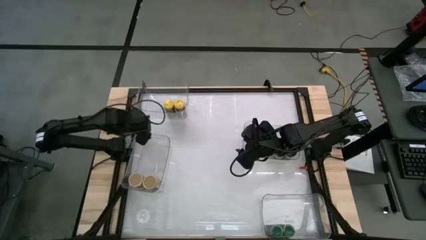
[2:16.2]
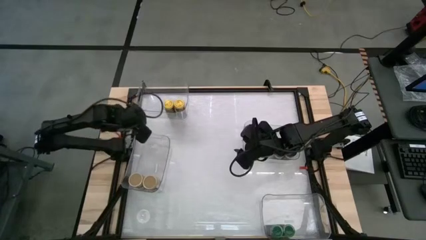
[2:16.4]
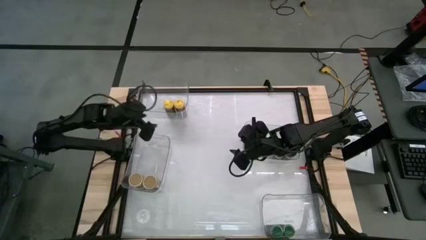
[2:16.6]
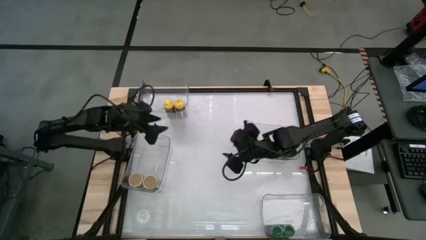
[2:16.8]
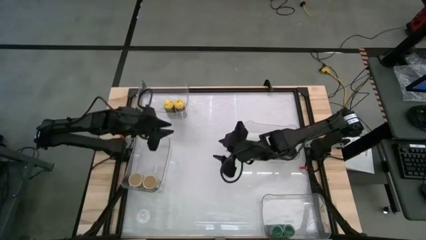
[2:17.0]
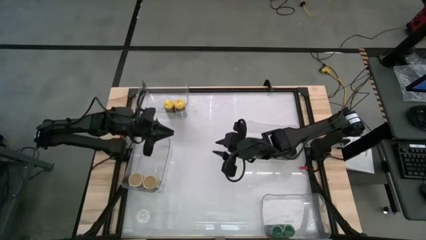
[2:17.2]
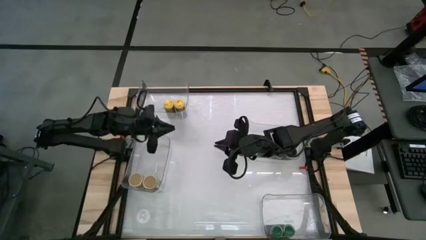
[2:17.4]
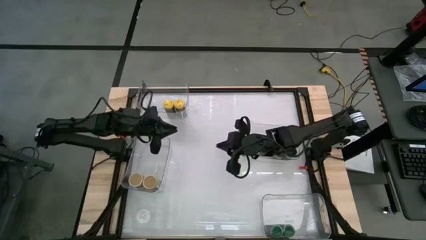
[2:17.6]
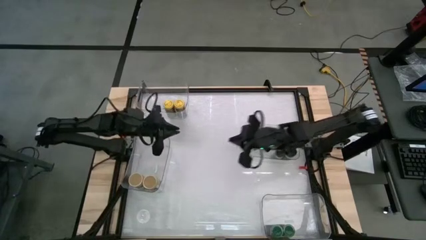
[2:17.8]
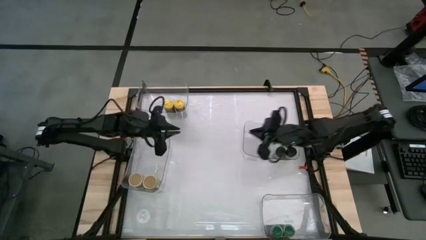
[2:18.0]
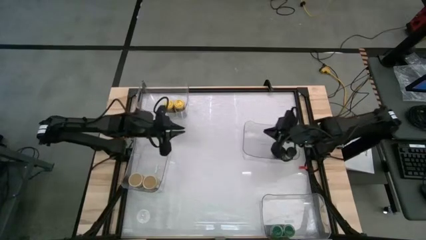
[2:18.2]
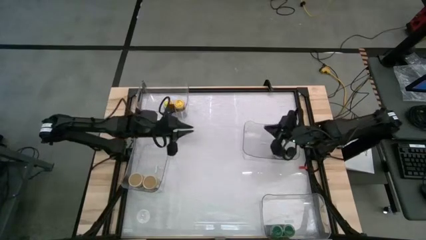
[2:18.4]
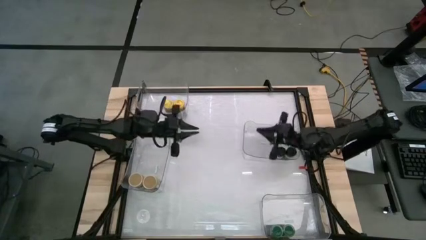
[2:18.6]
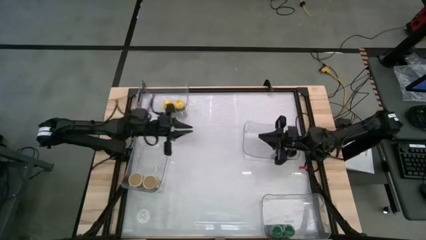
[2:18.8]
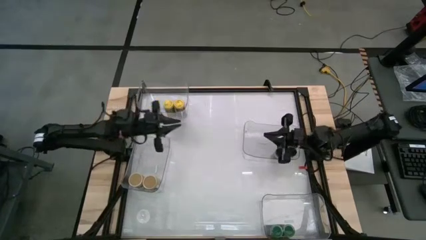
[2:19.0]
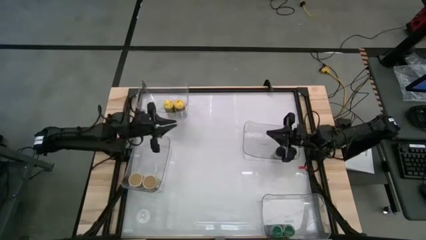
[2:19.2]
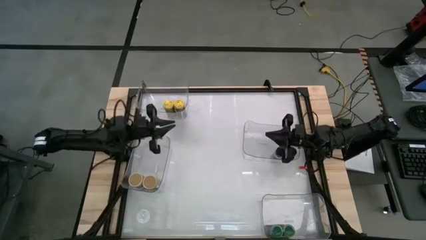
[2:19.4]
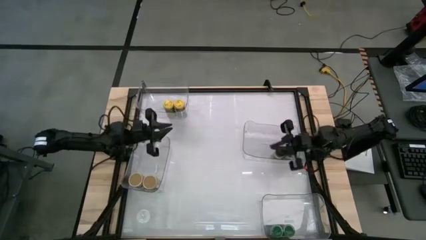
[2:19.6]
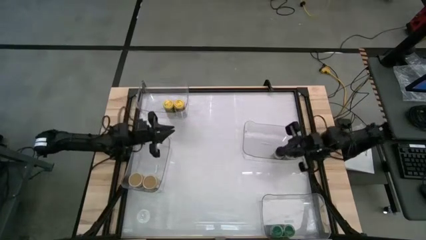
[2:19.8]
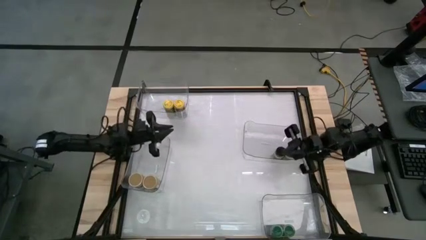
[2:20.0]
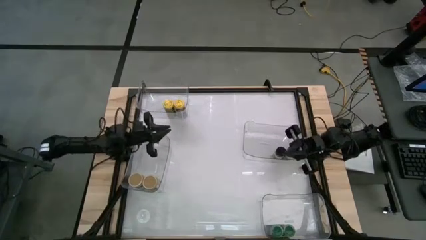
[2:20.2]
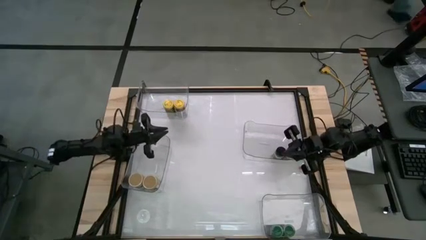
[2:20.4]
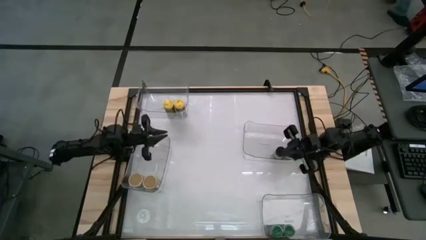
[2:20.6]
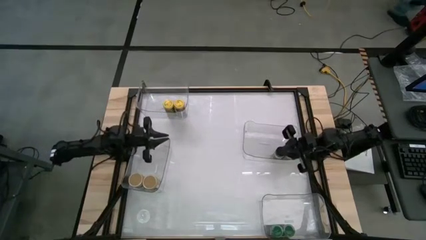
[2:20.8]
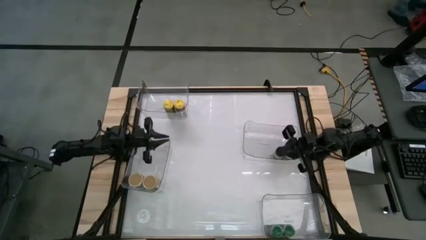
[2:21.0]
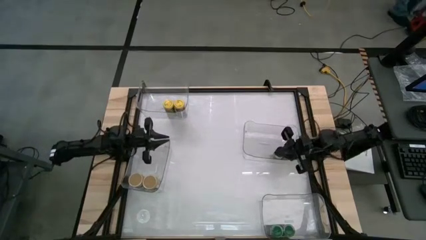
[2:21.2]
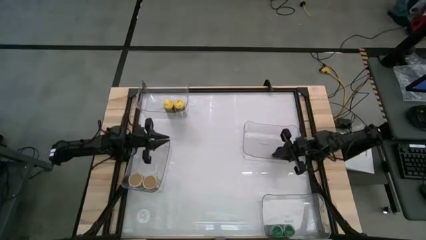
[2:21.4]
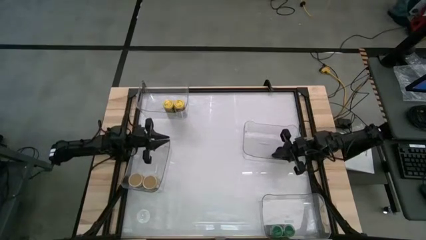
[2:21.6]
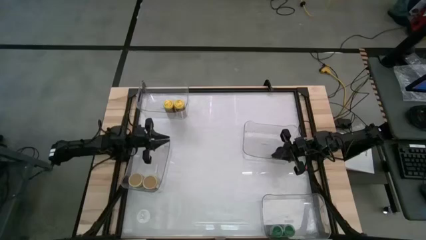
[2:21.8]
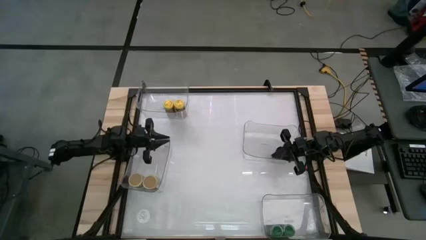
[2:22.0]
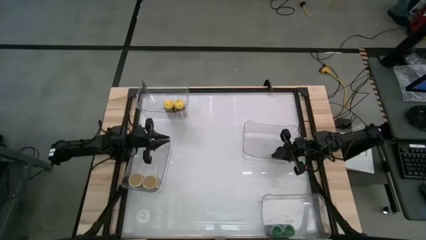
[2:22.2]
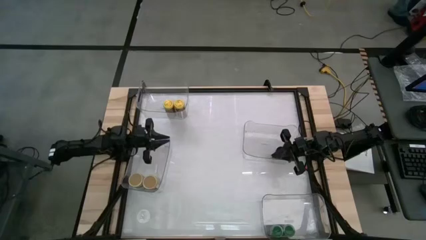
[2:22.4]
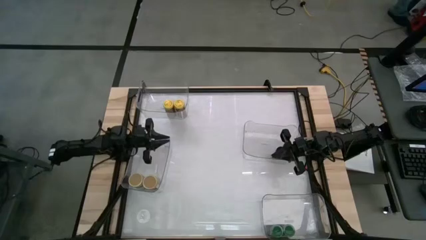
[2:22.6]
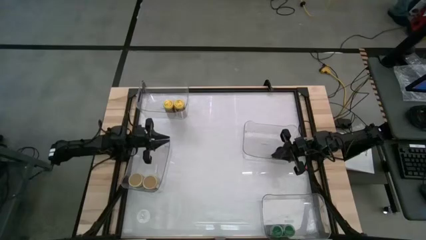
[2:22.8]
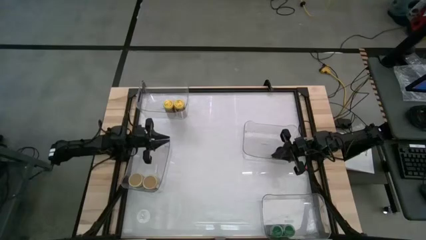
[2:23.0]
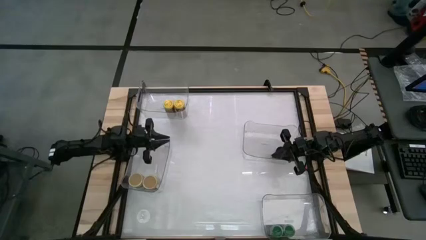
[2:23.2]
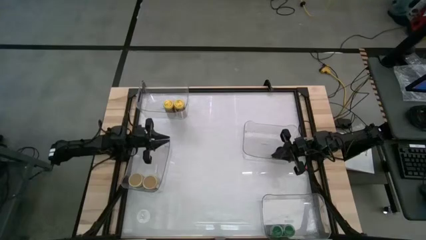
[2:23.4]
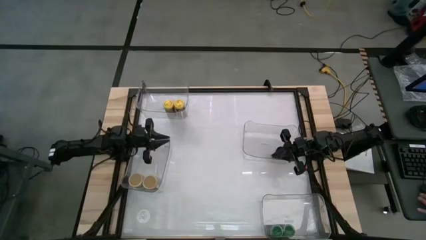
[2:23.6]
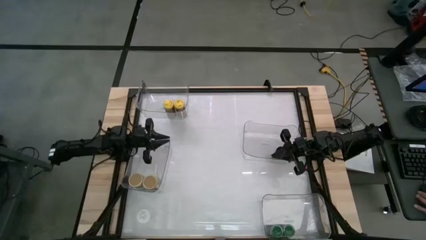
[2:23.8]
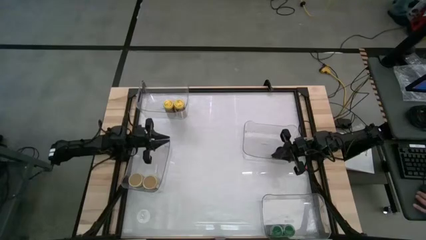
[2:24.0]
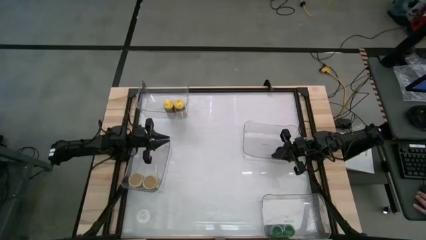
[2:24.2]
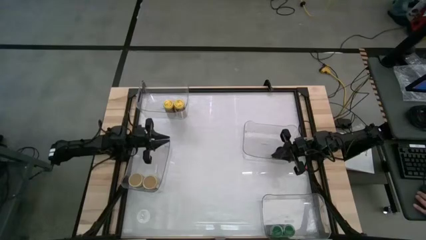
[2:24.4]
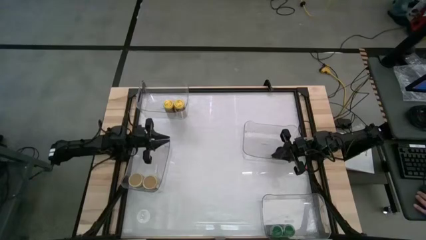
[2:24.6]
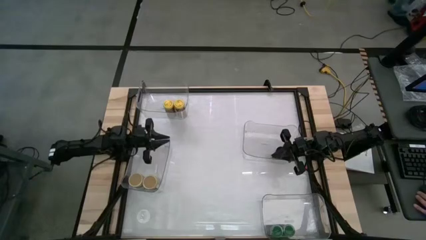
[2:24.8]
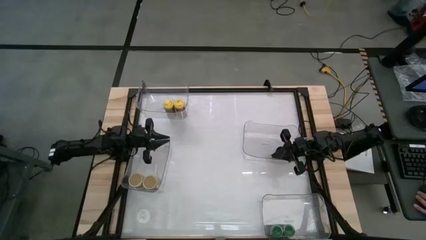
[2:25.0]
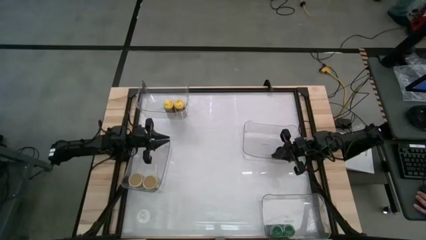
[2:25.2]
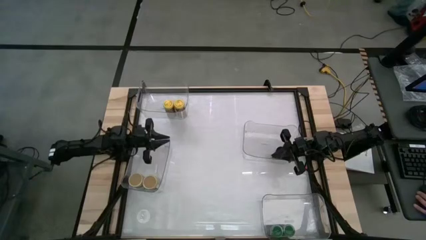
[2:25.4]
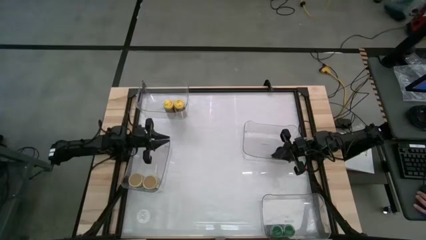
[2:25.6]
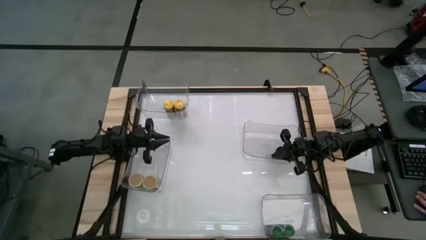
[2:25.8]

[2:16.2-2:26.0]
Task: Sort spices by type
Return to Home Position

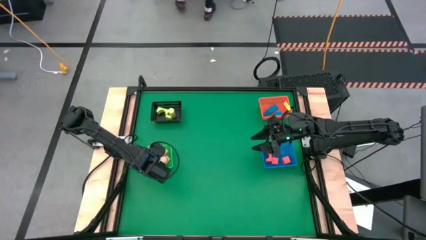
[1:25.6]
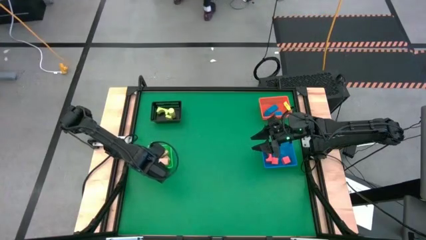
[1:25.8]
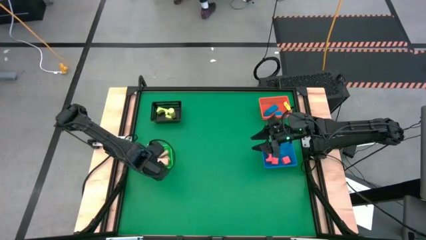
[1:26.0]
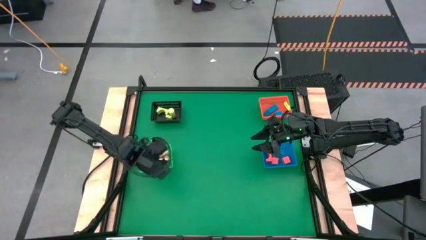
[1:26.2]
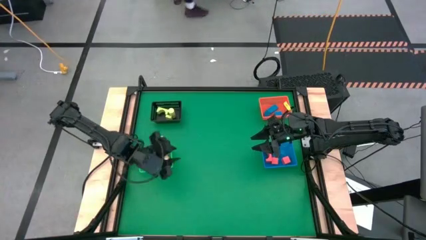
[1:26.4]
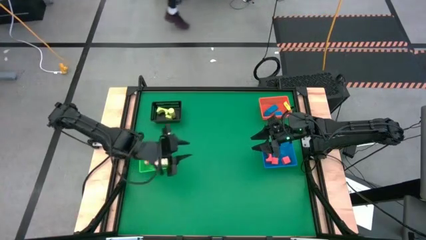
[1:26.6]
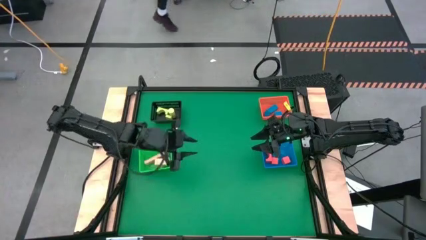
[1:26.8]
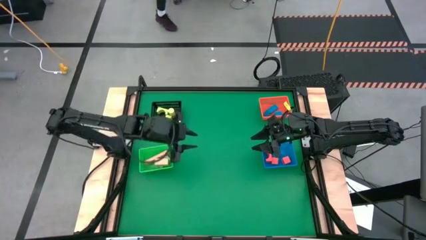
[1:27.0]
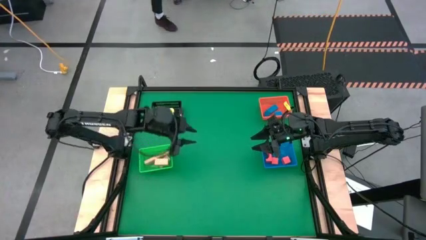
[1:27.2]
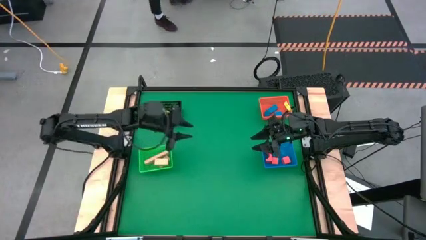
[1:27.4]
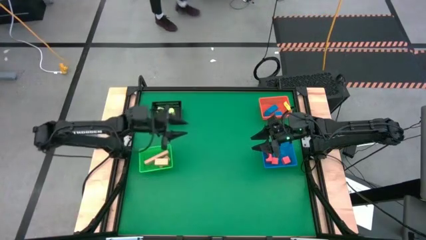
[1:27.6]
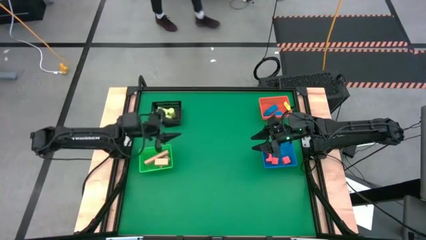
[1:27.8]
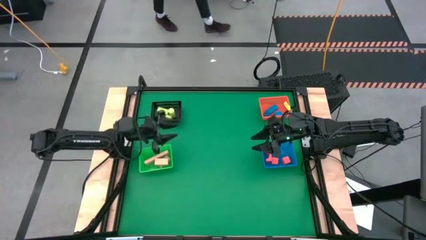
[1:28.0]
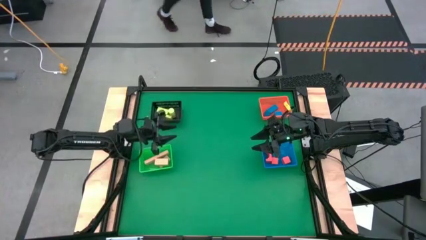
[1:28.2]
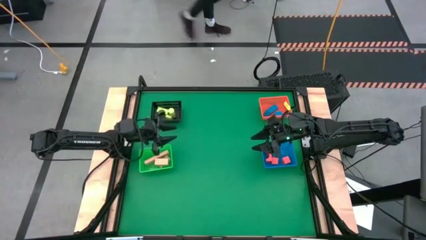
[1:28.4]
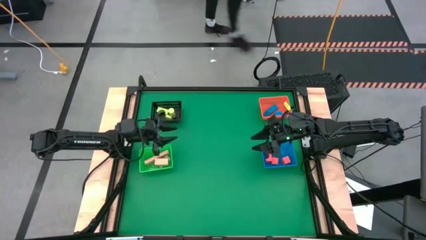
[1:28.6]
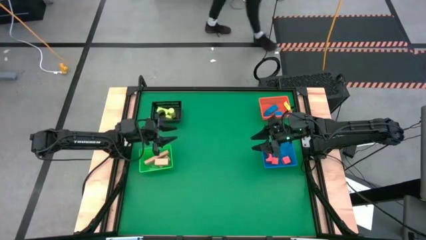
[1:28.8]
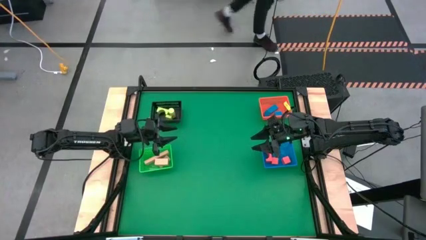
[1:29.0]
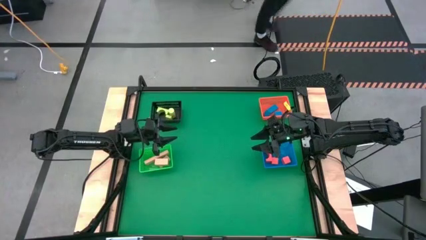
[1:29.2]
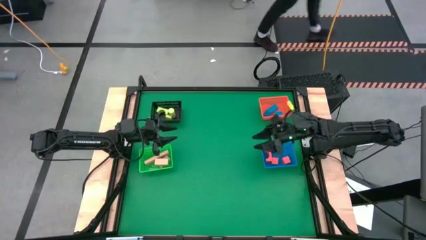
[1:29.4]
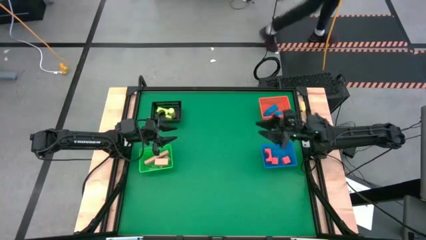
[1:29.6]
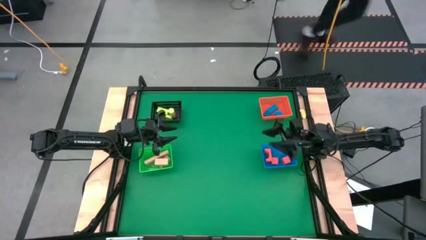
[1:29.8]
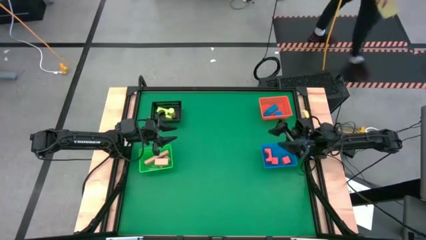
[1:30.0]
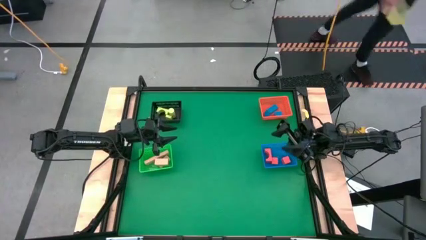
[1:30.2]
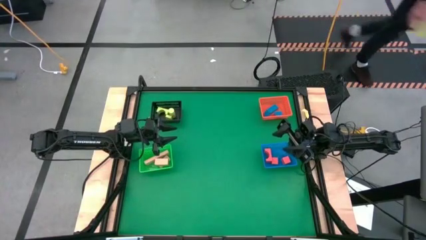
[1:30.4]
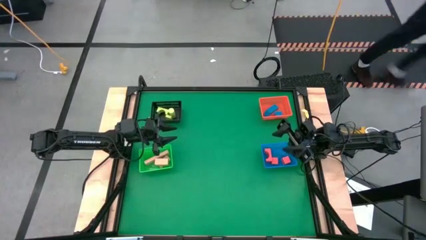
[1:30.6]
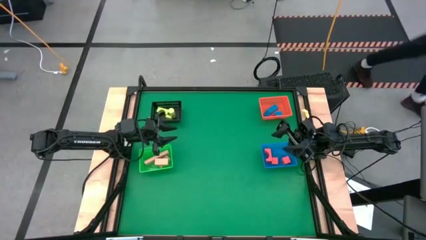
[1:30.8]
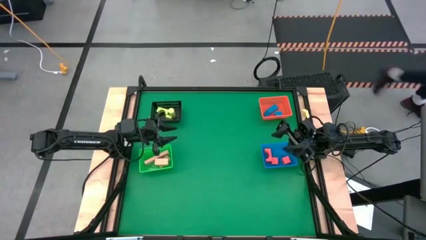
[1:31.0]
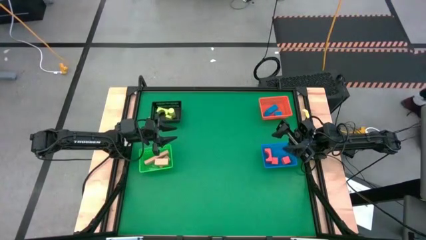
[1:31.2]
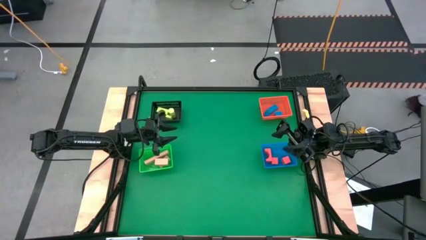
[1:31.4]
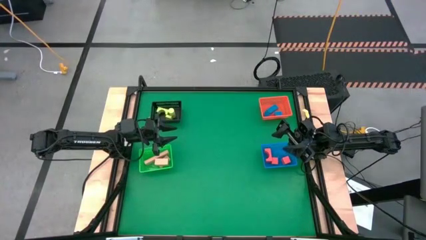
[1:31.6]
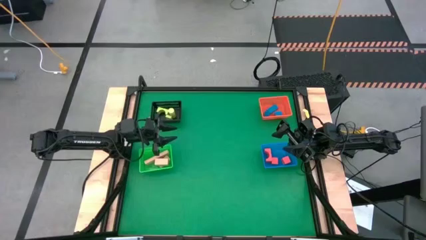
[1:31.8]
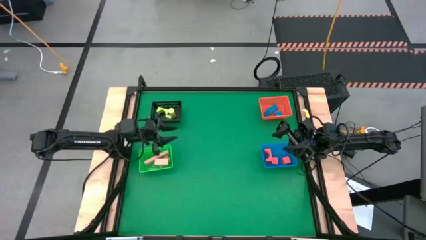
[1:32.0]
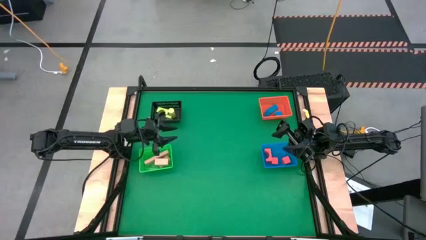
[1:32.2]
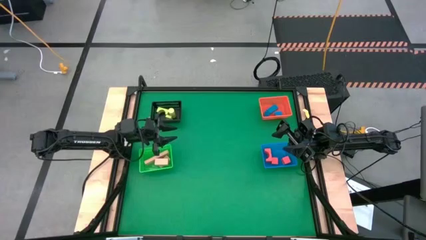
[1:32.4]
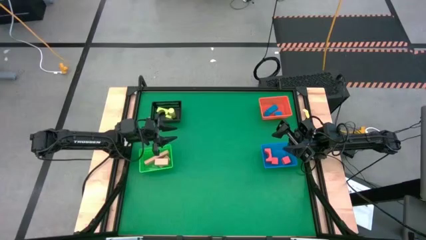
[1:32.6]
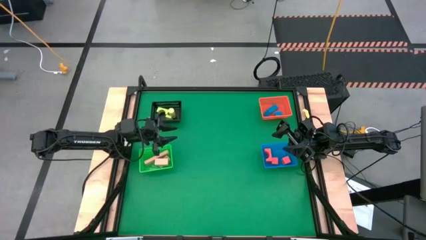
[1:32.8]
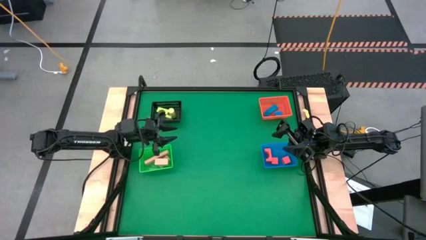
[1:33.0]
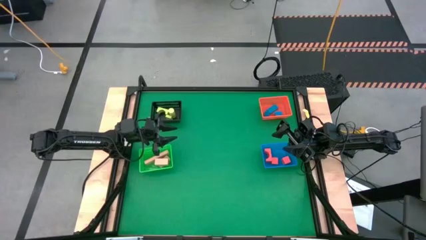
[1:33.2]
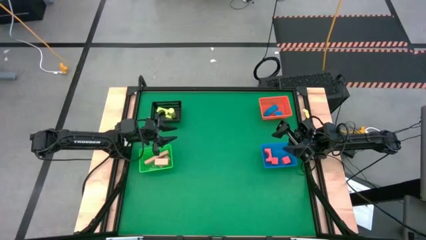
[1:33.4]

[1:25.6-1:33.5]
Task: Sort & place blocks by color
Return to Home Position
